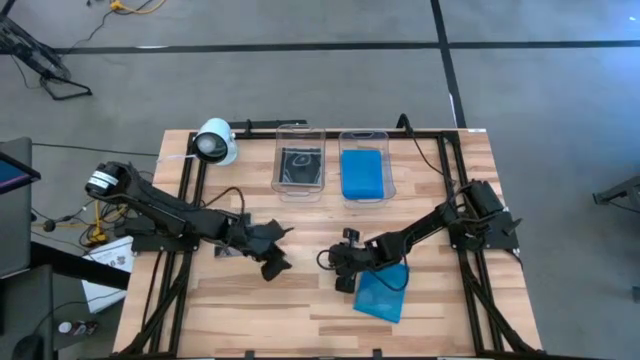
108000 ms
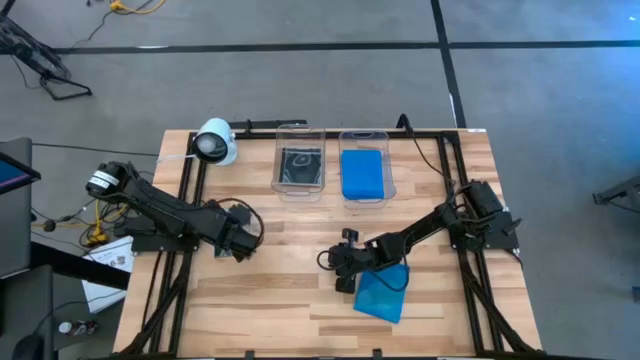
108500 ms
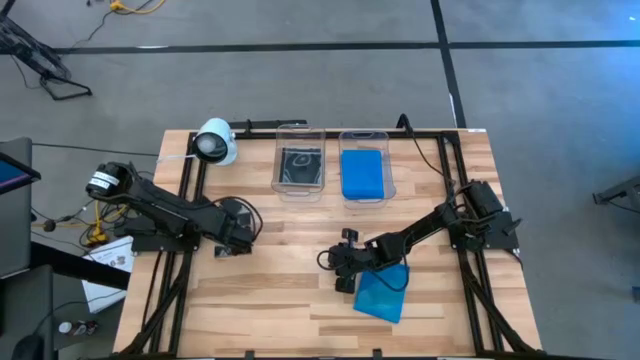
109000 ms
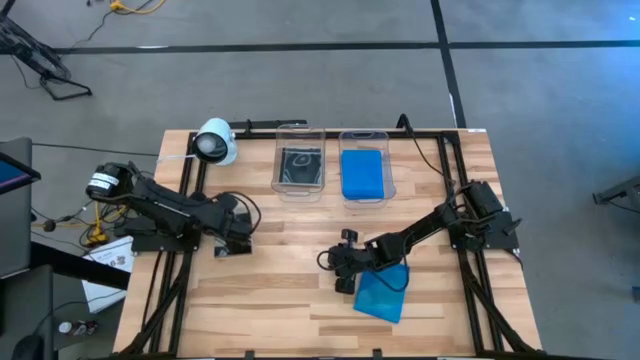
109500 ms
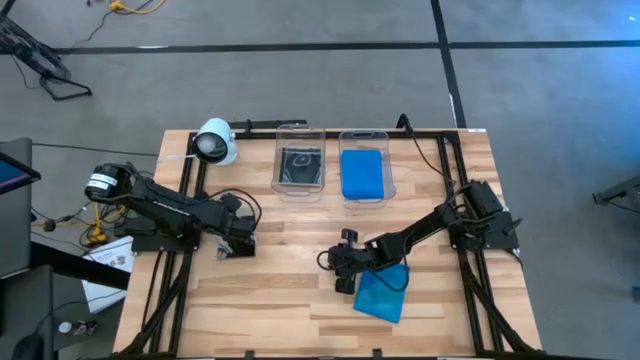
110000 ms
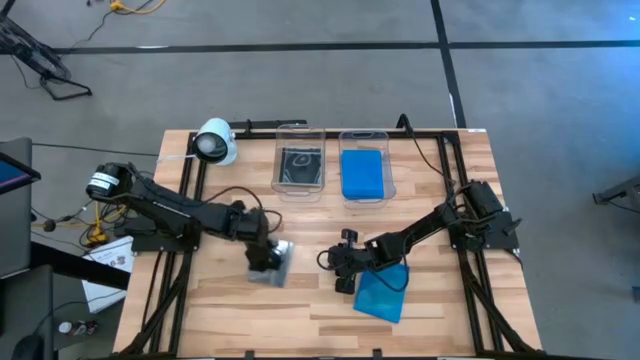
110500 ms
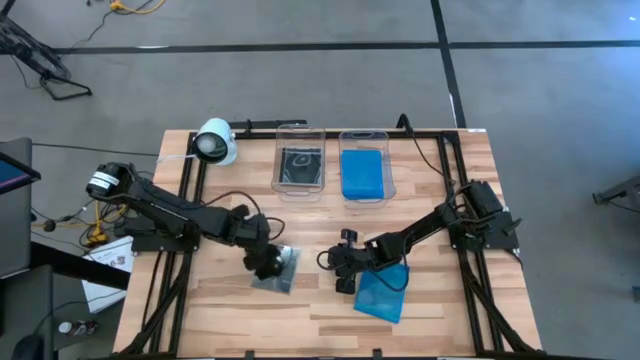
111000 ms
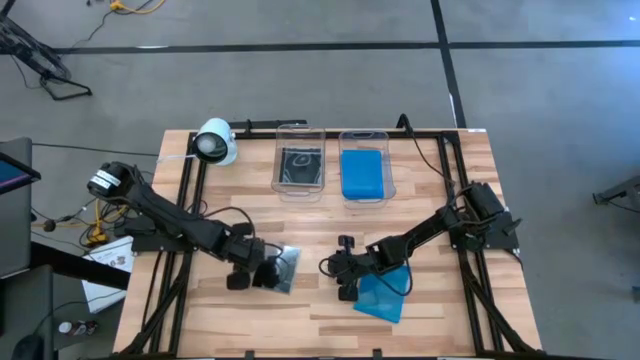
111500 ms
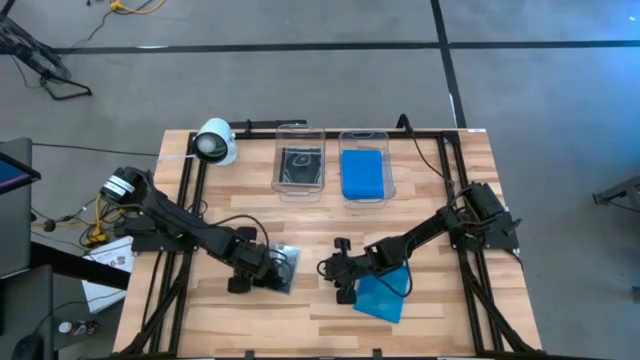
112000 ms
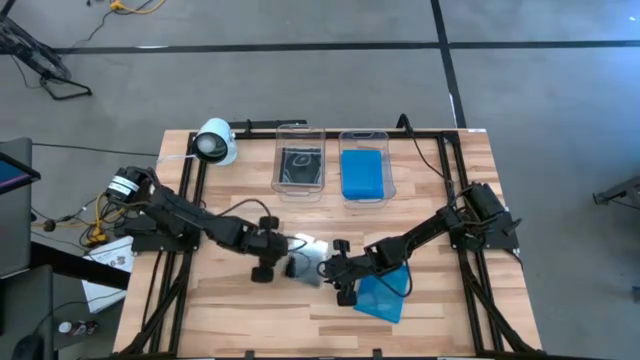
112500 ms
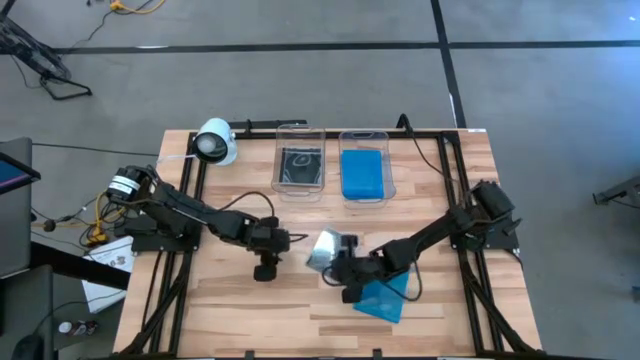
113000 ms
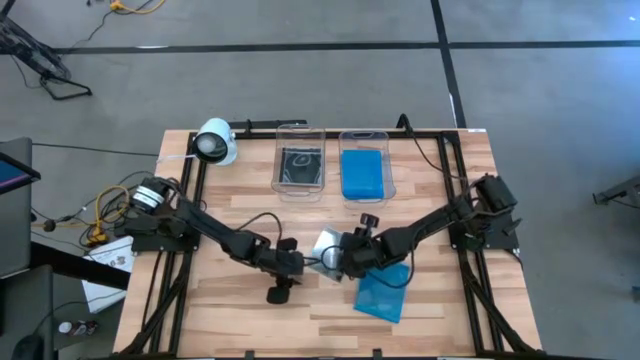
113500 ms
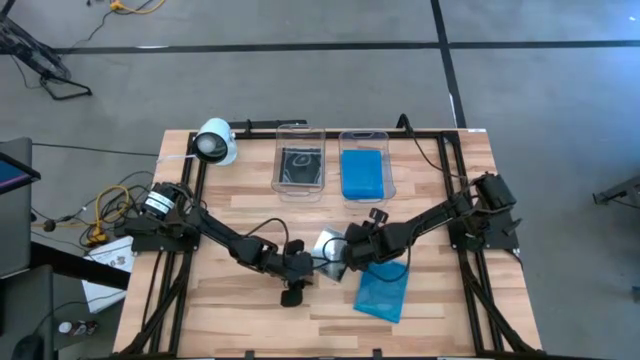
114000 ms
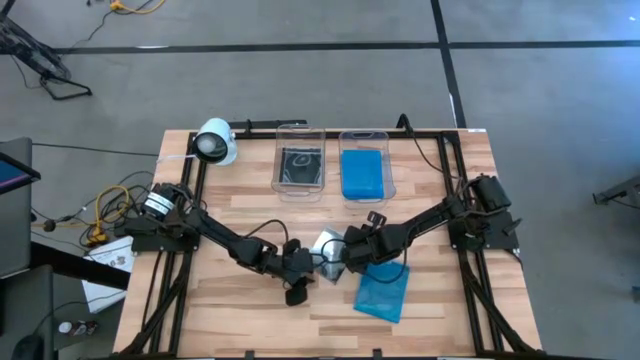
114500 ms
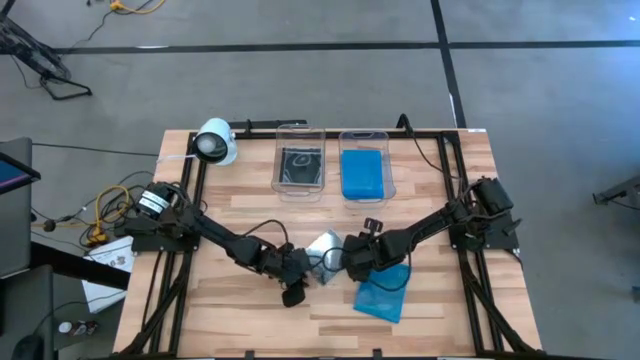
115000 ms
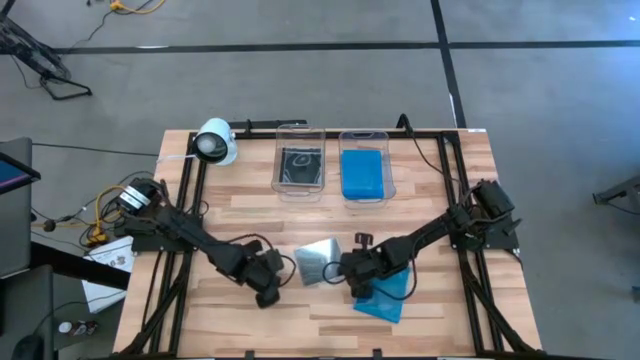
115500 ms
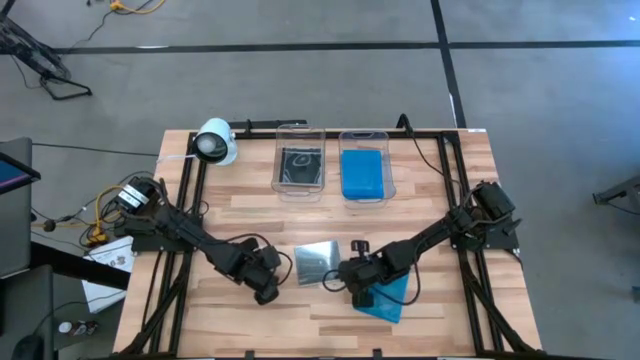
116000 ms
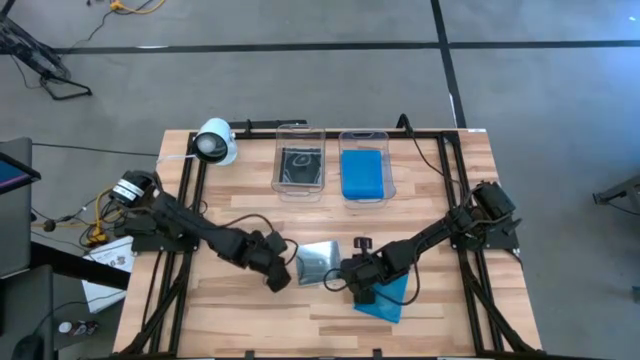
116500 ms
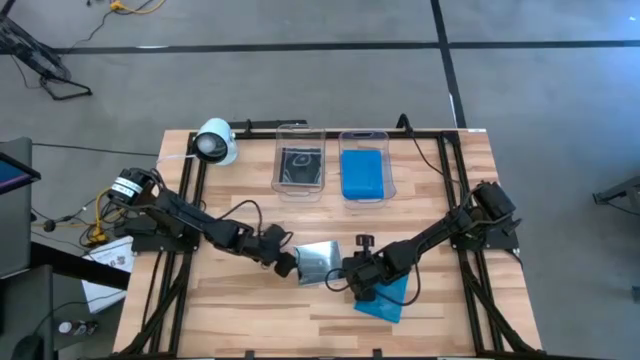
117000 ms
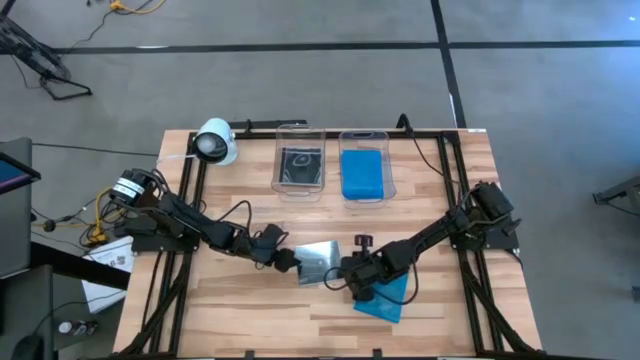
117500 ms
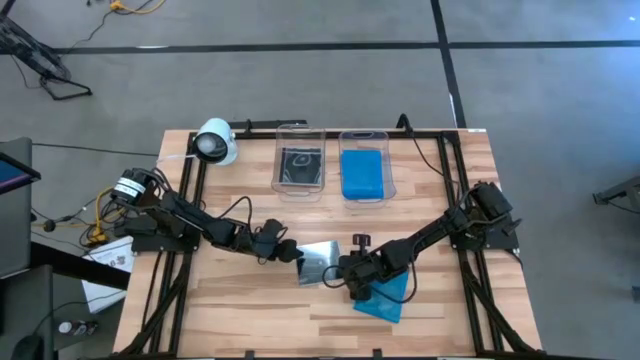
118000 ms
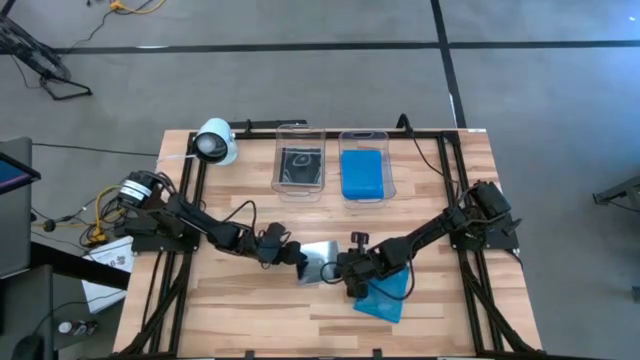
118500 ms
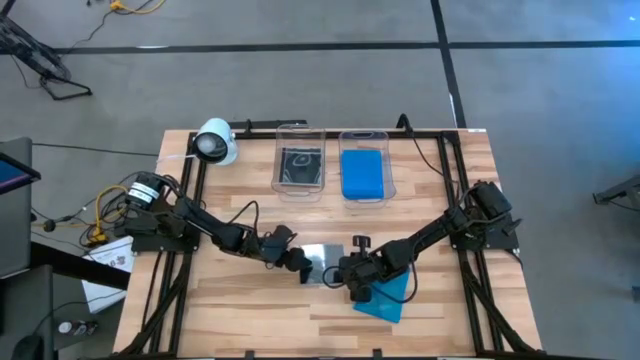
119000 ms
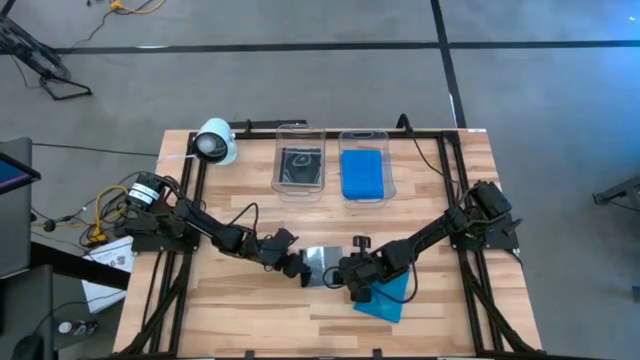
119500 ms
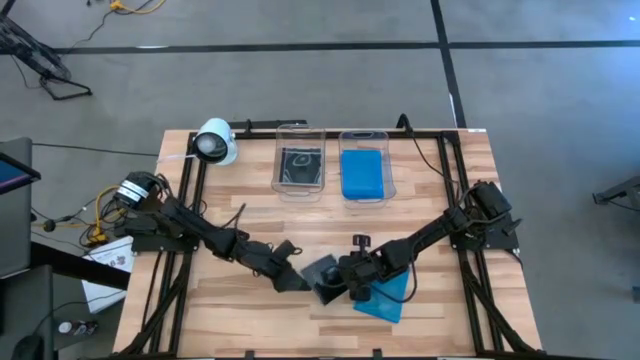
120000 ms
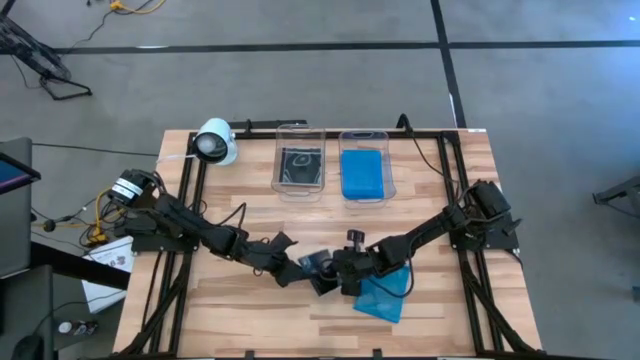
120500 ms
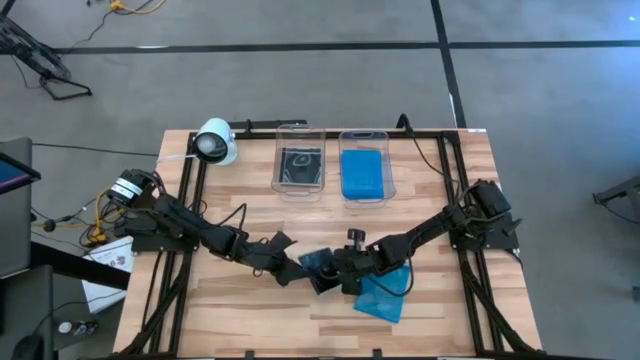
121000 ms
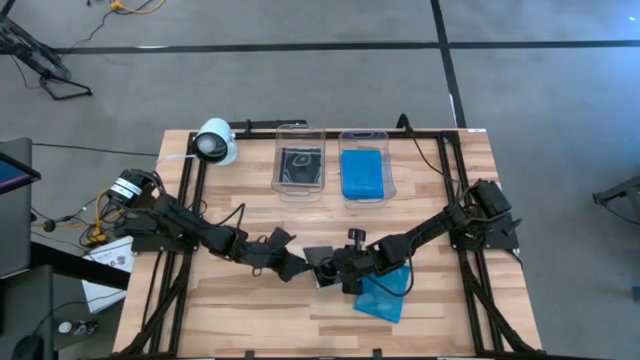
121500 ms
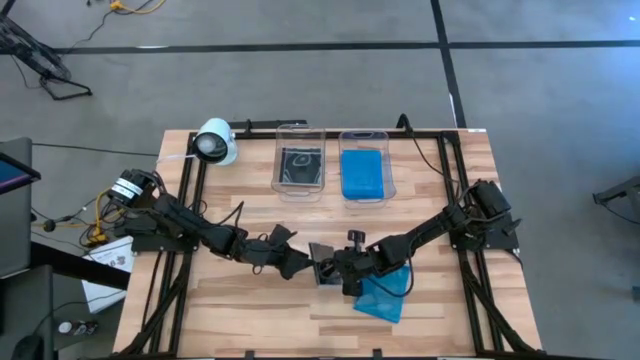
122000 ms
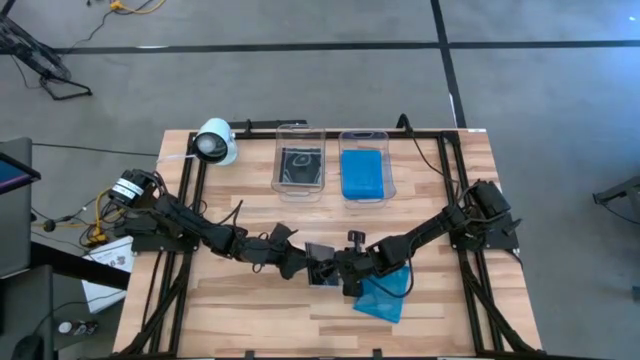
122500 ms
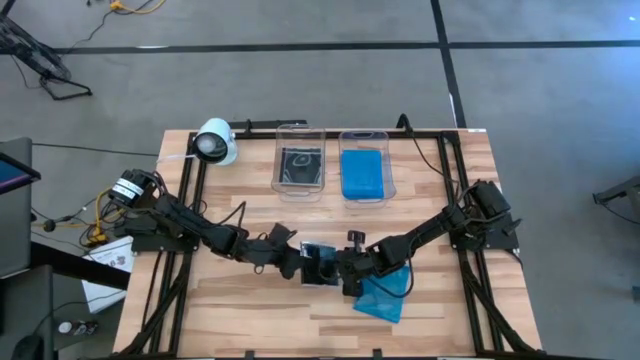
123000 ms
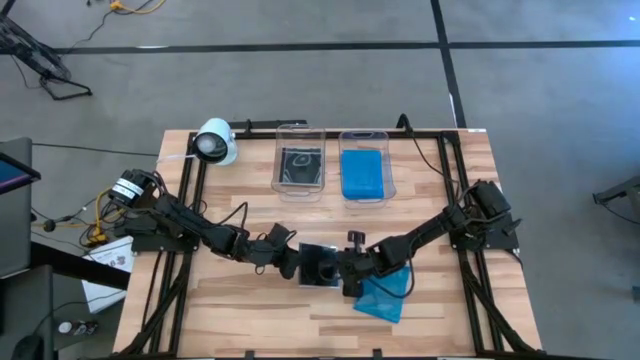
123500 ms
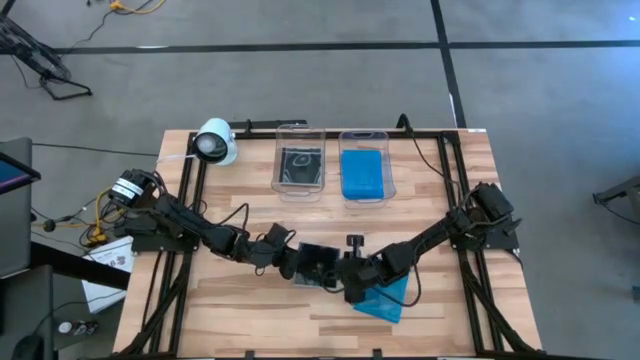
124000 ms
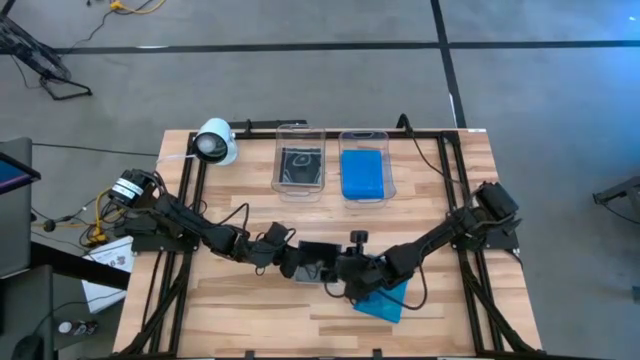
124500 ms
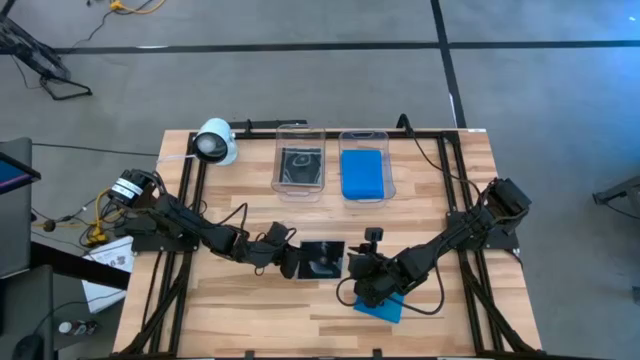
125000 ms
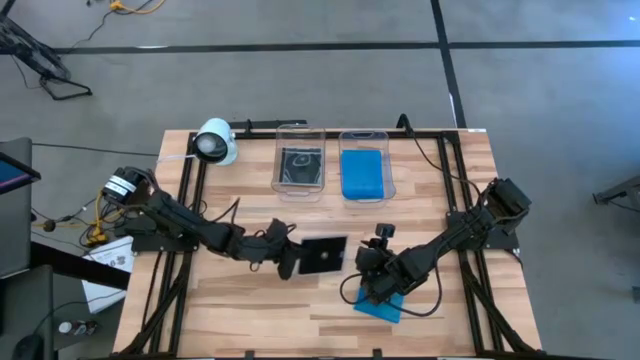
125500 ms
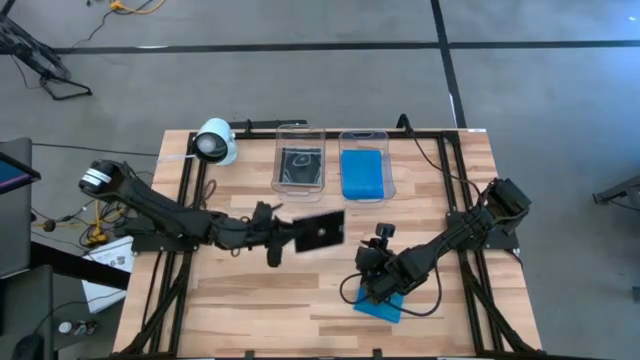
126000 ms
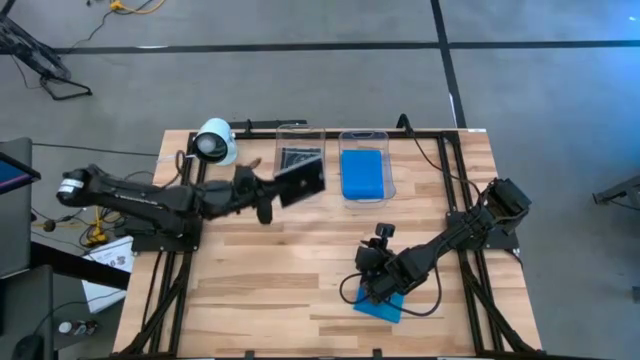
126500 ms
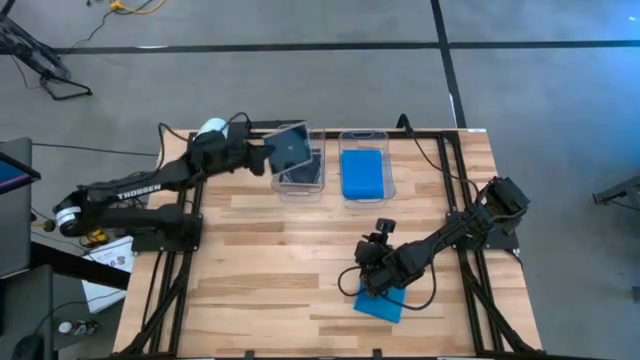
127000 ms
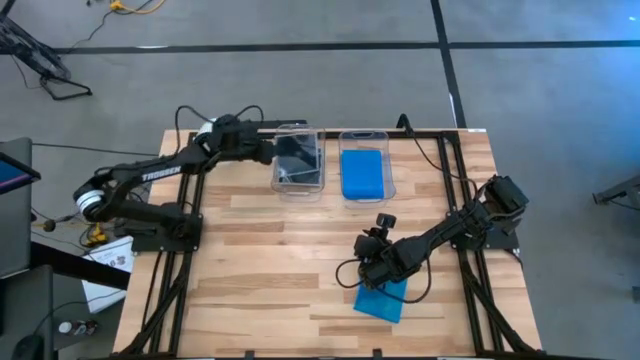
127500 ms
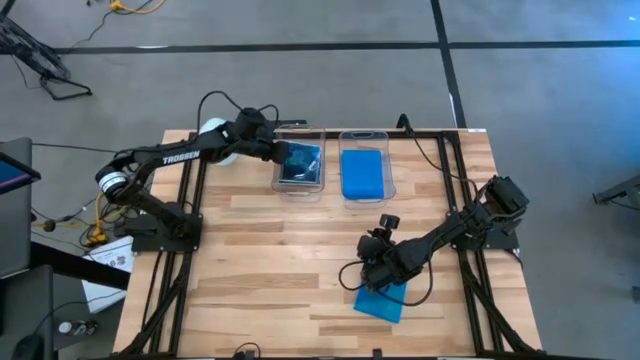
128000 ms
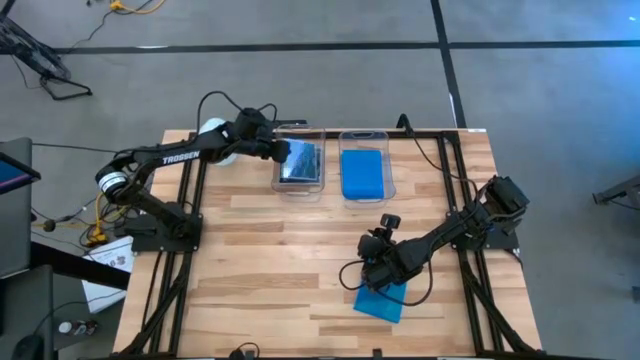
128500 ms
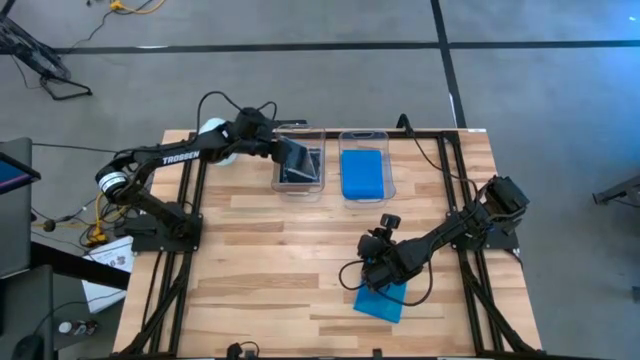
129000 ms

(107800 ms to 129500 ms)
Task: Pick & place jewel cases by type
Put the black CD case into the left transparent bin

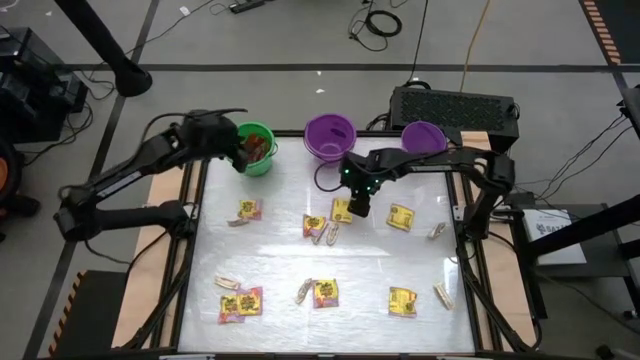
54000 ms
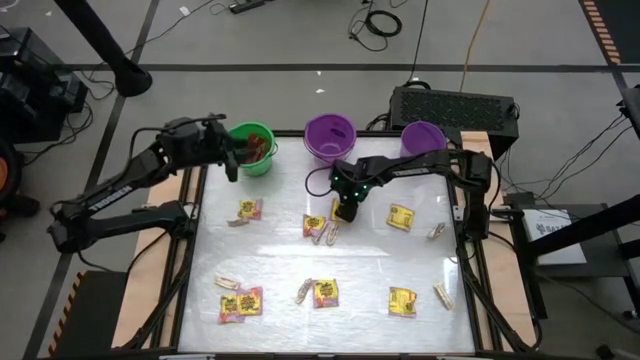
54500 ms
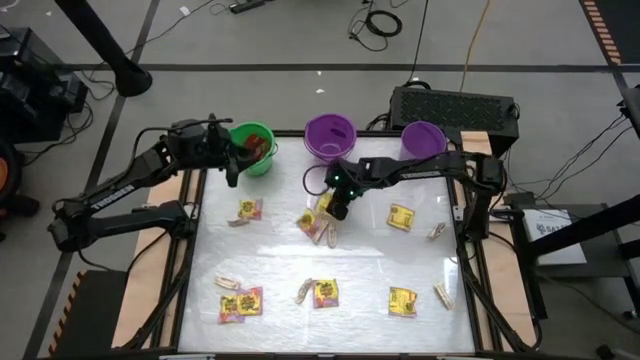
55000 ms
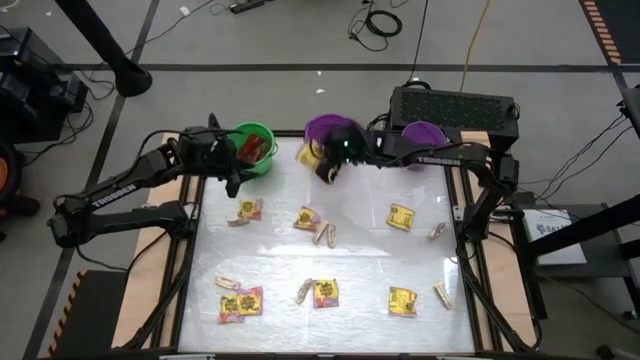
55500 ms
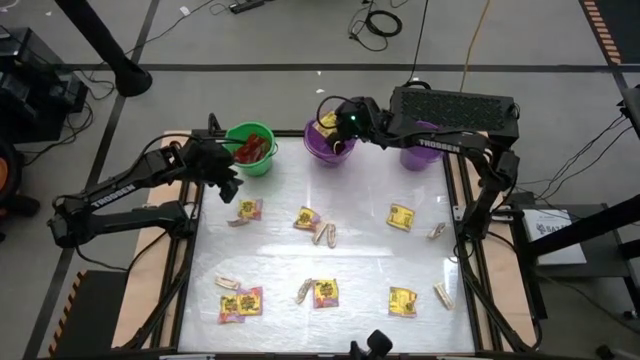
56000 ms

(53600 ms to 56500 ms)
Task: Sort candy by brand, put in halloween buckets
Put the yellow candy pack in the left purple bucket
